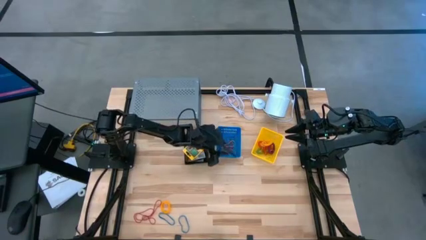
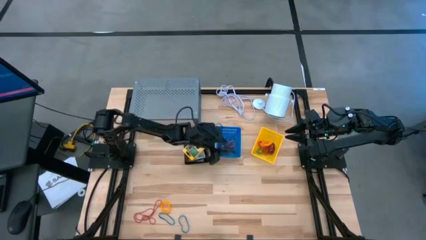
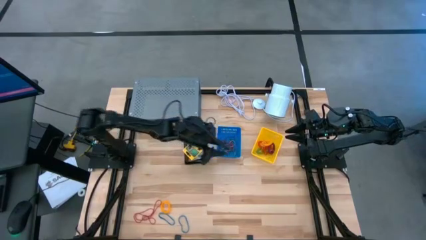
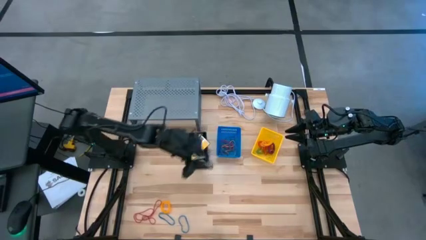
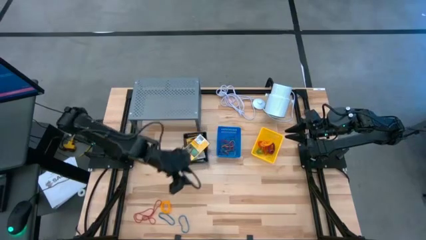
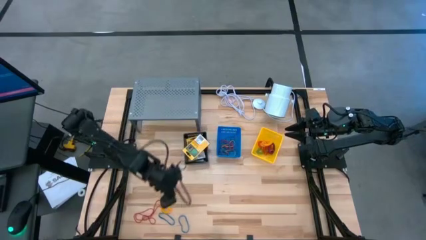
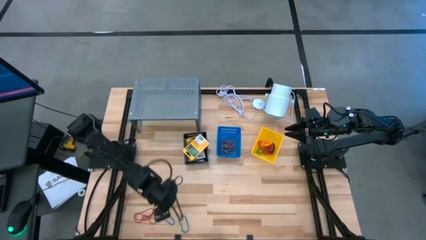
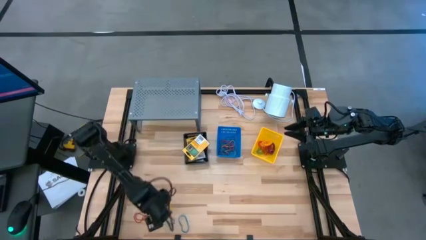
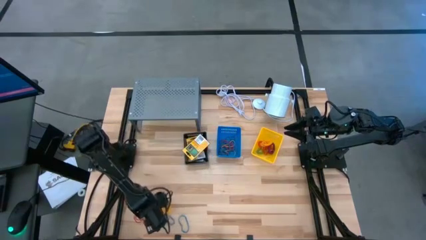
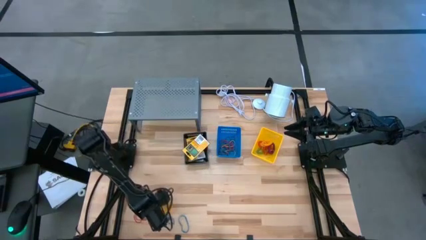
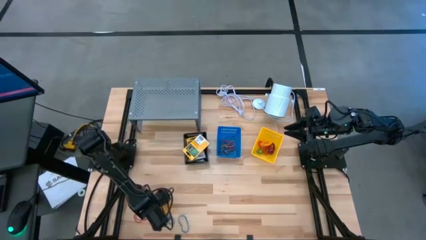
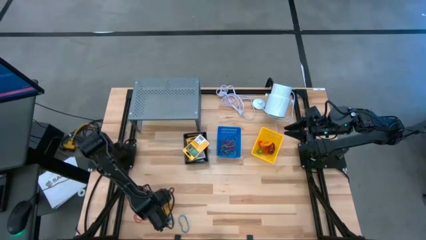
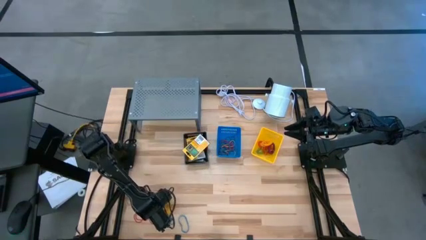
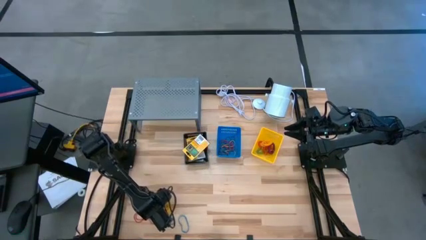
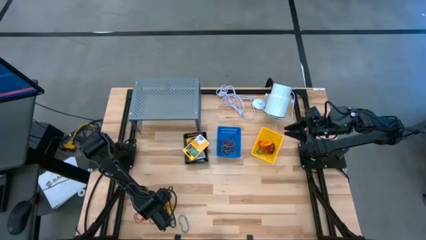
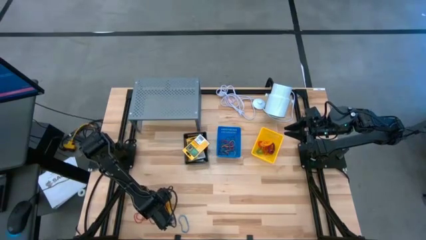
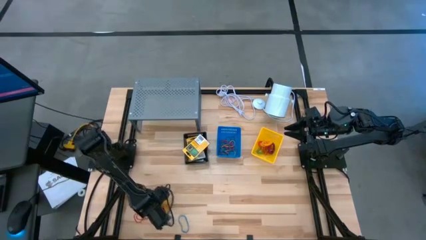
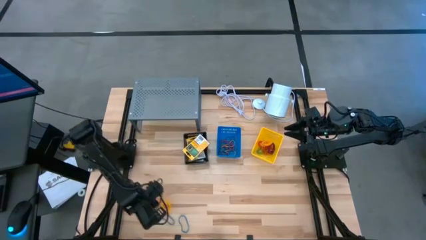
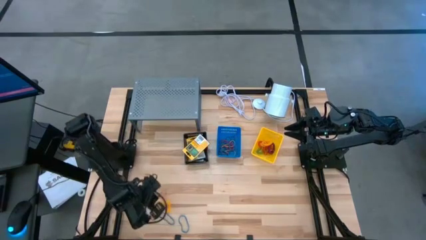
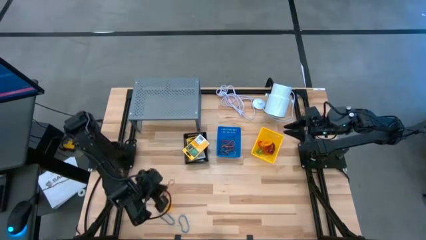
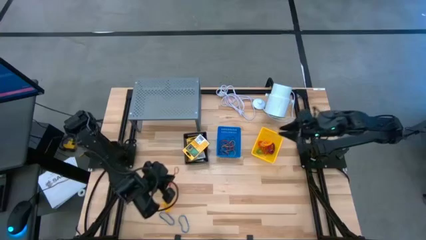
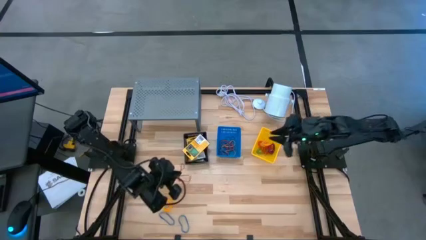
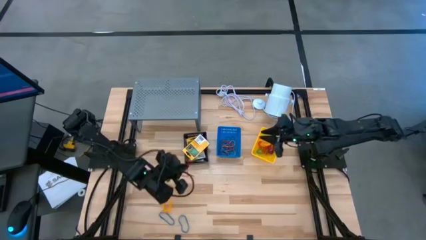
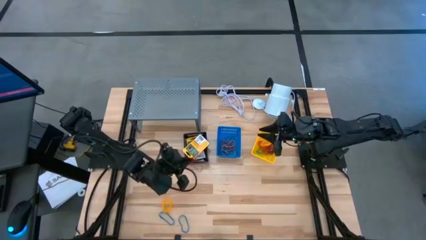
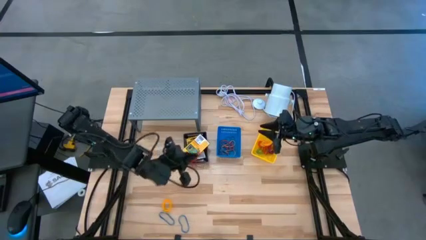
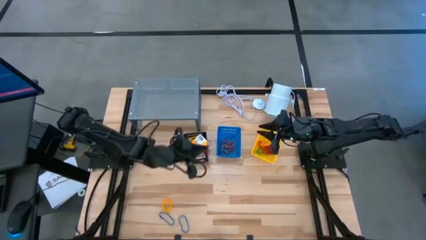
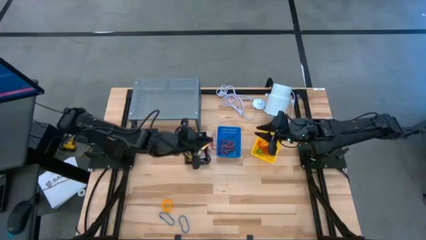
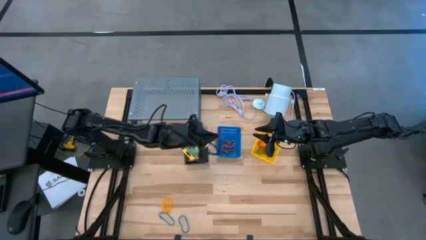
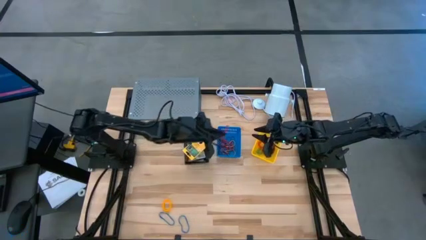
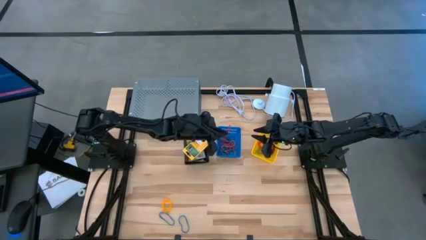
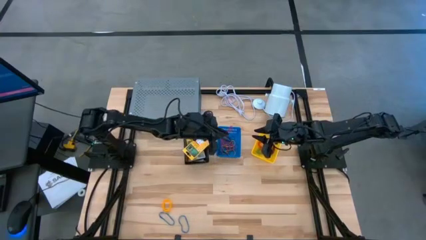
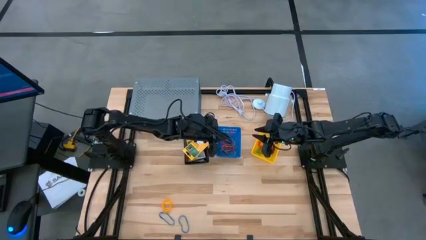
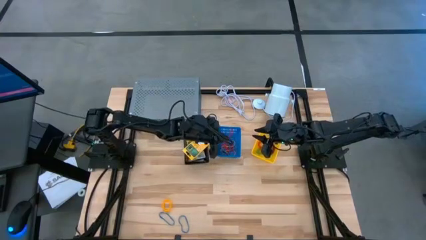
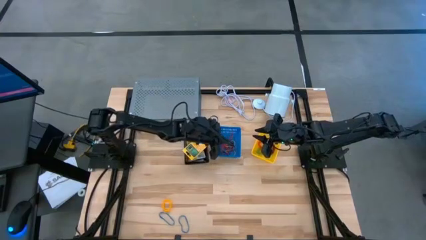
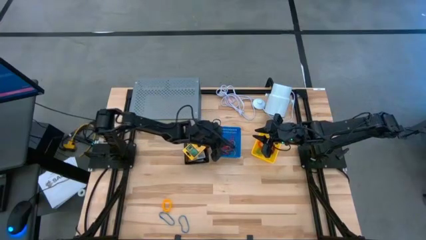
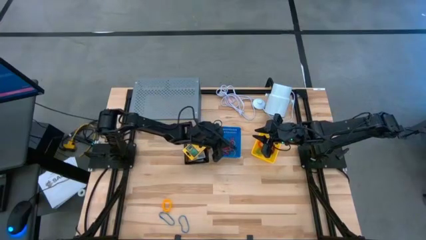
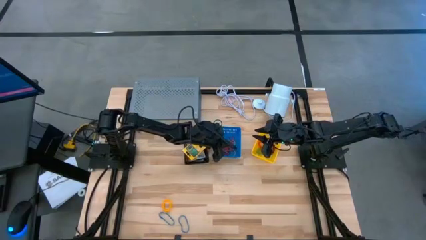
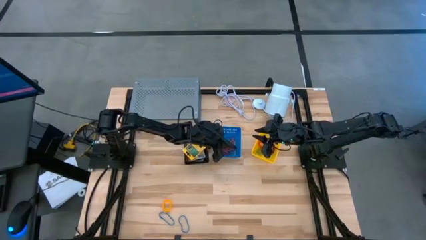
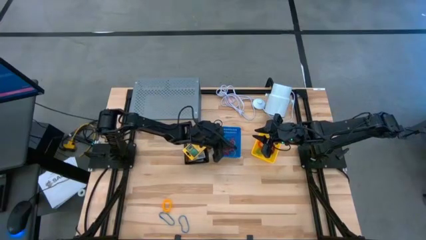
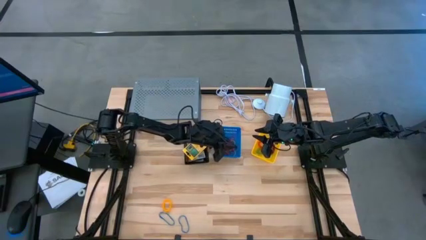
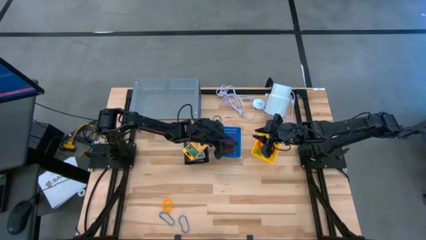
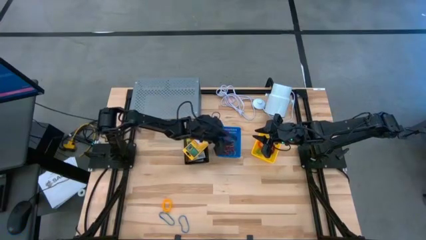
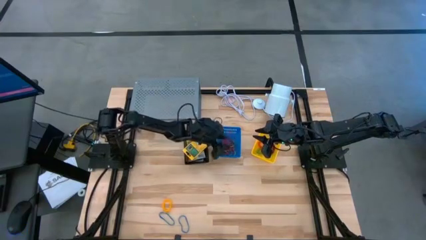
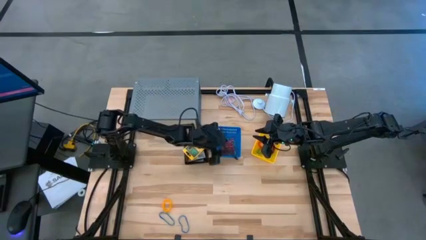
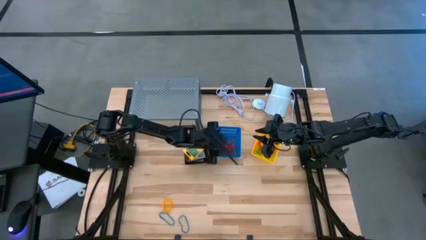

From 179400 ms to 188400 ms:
Task: Pick & Place Office Desk Supplies
Put the red rubber band into the blue basket

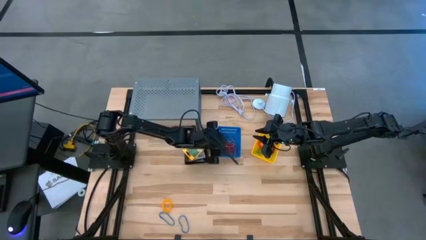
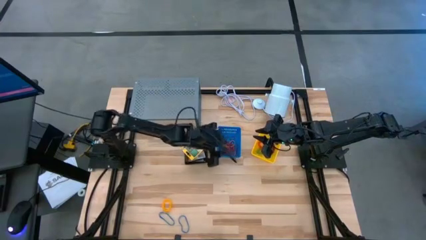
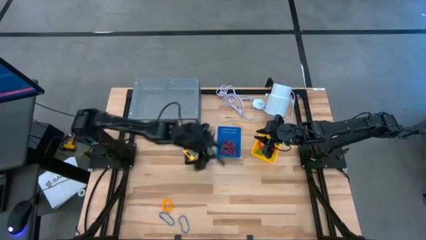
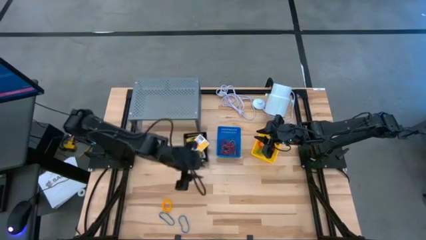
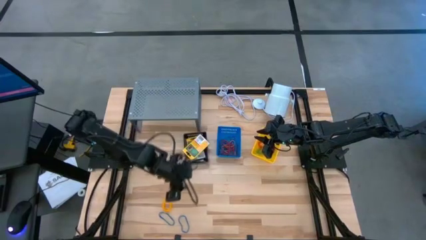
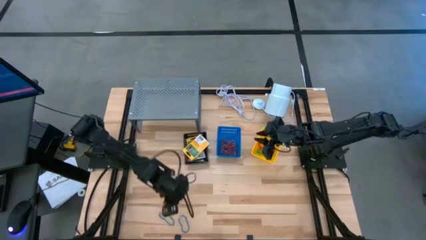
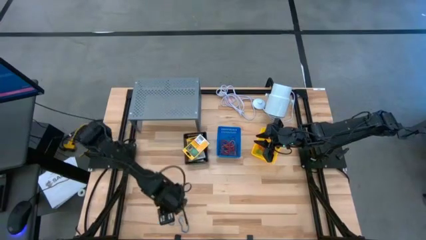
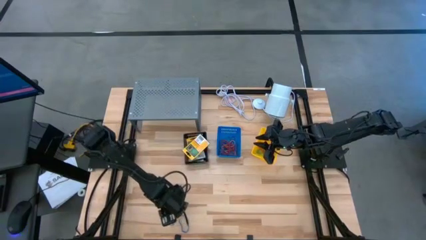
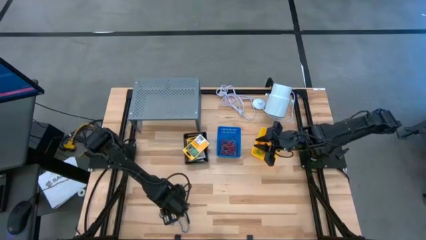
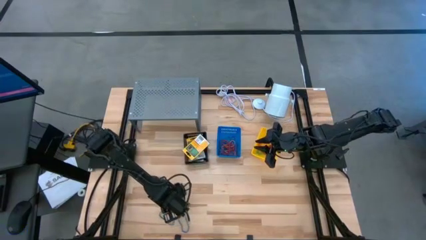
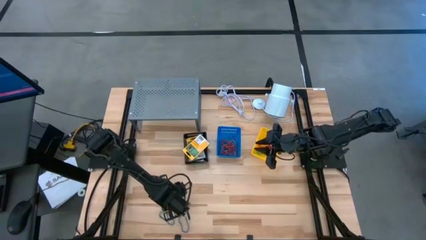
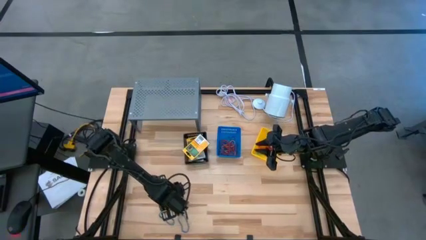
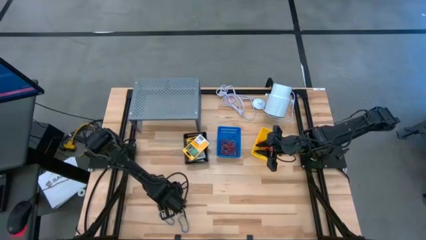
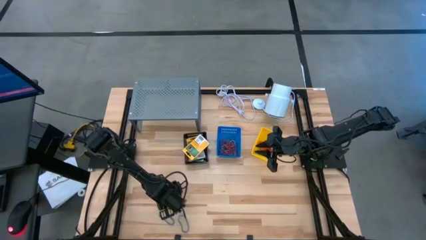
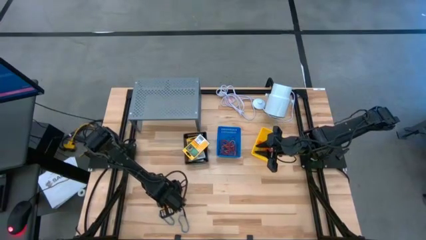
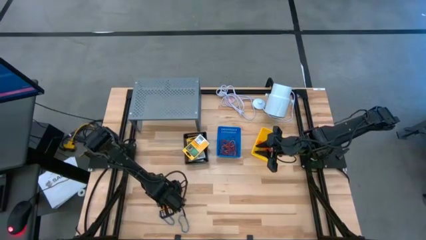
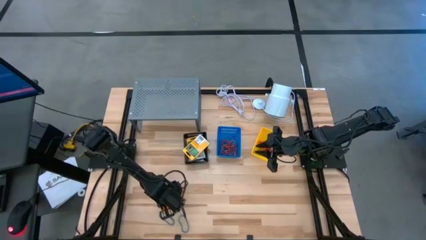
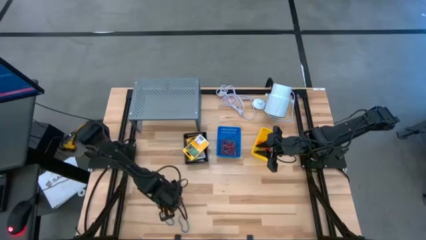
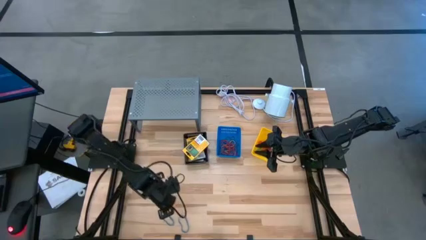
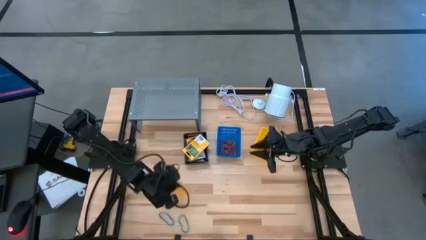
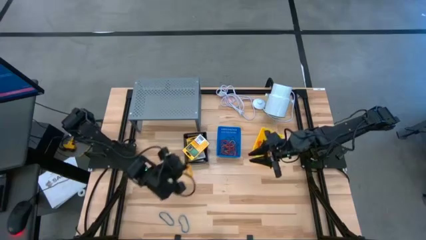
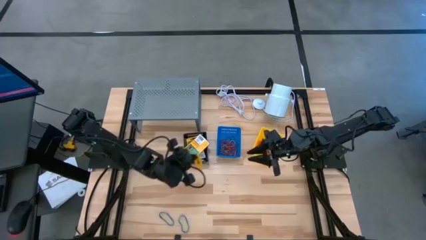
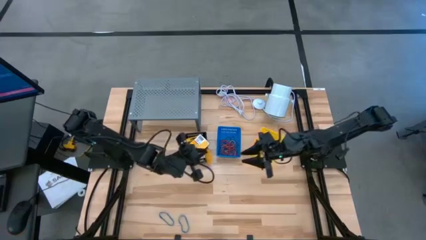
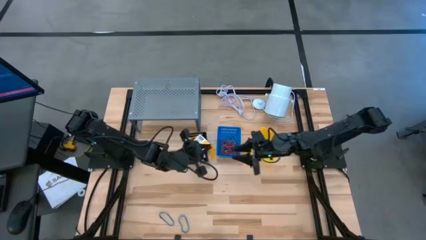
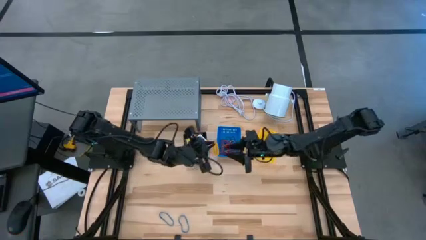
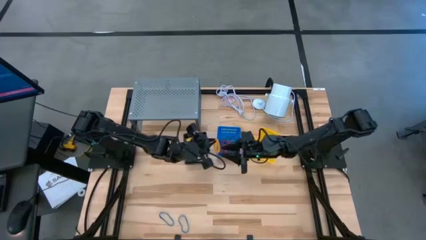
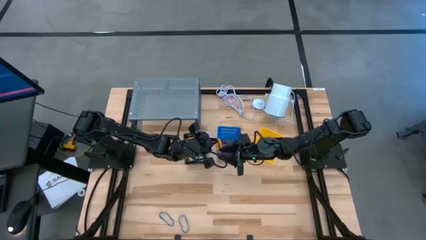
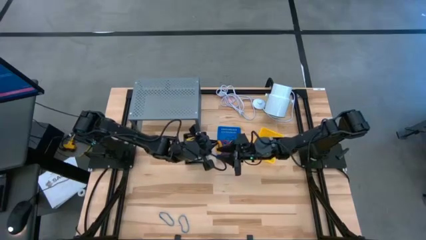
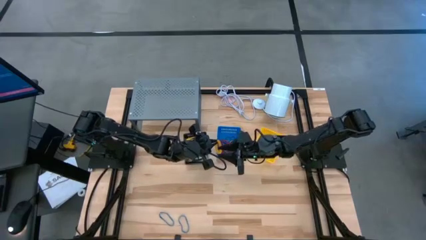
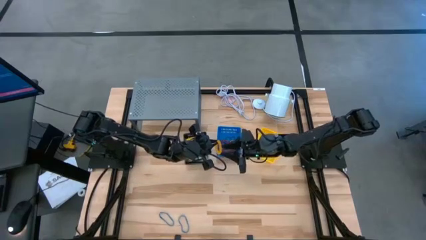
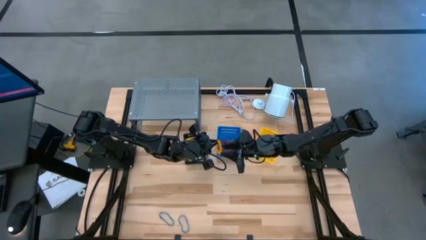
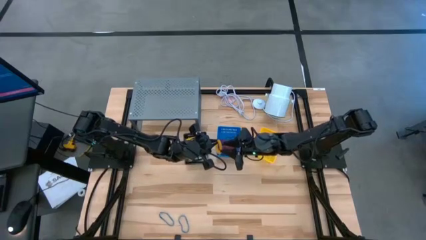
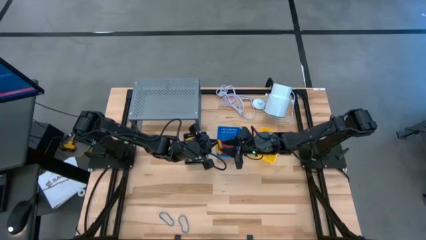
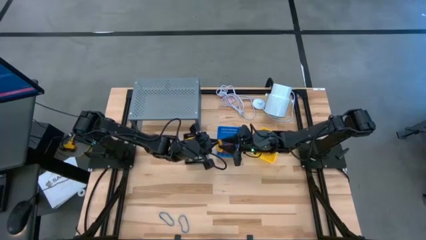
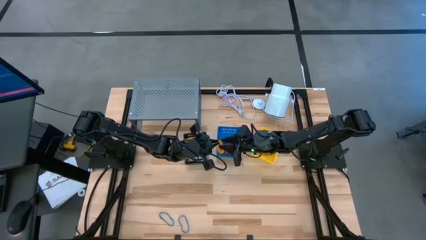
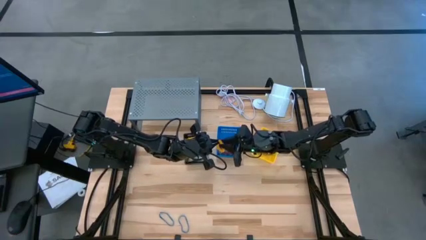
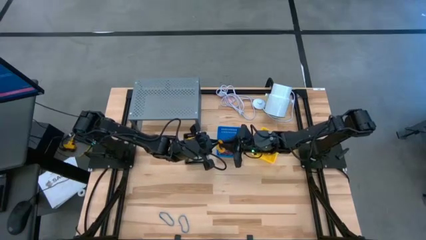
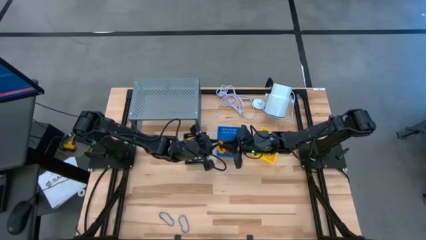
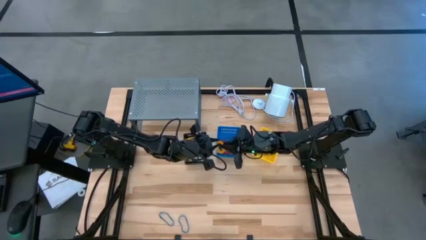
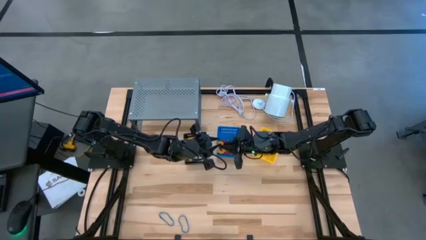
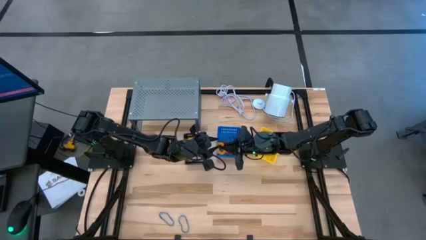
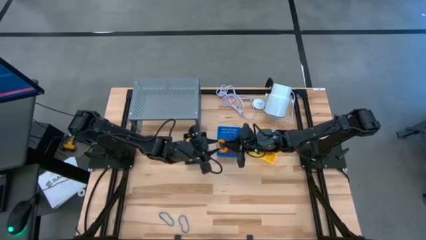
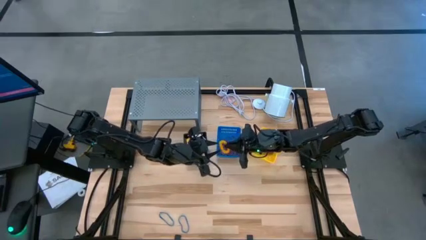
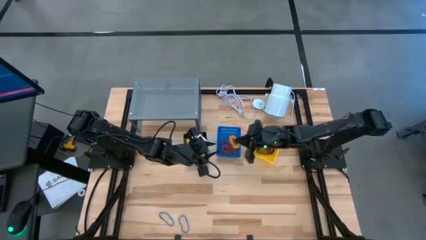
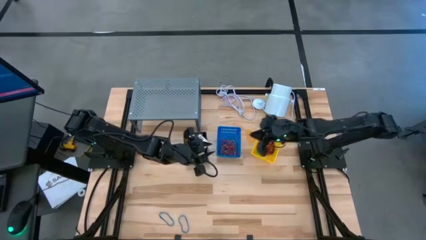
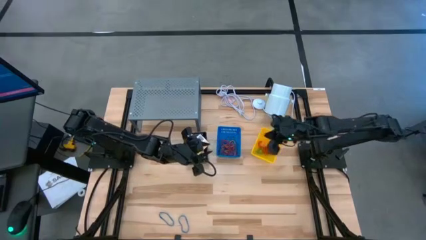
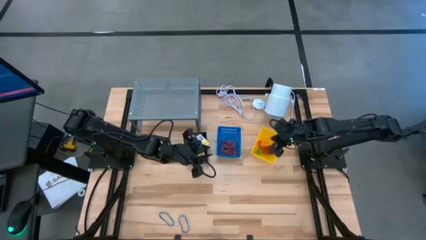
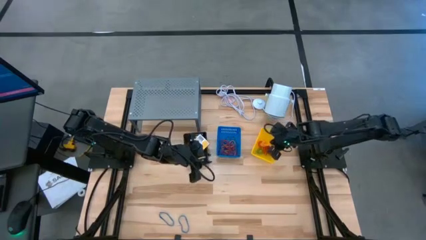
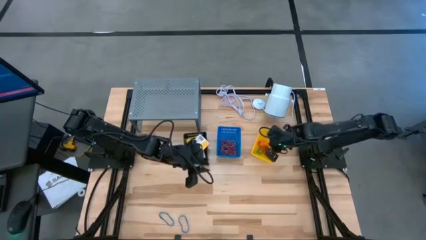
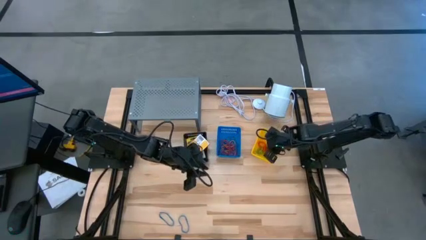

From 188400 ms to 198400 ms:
Put the yellow stretchable key holder into the yellow basket
